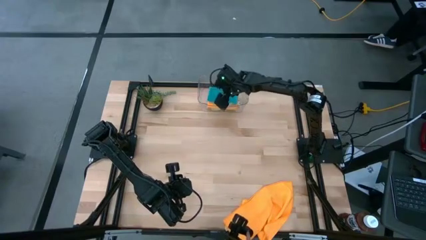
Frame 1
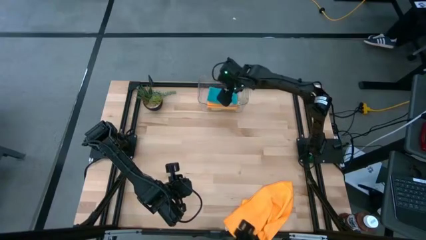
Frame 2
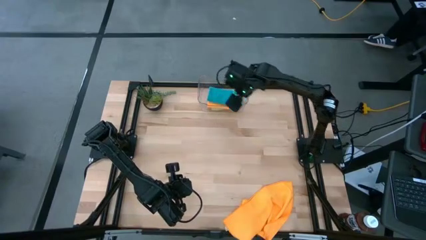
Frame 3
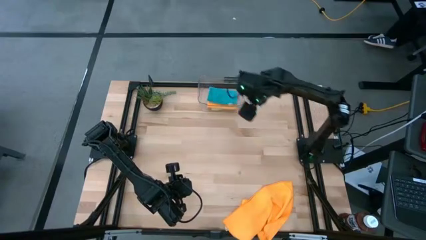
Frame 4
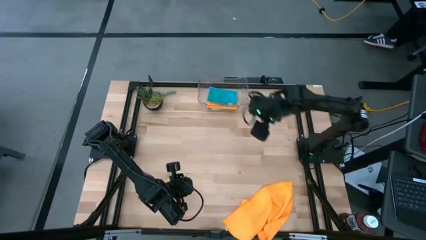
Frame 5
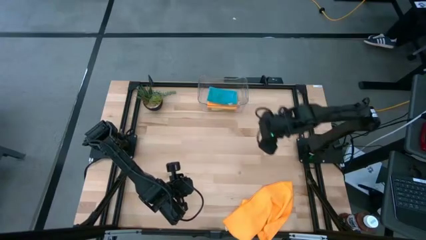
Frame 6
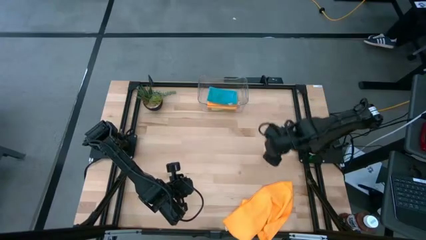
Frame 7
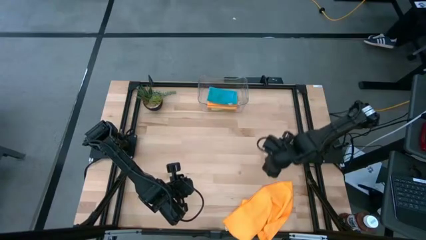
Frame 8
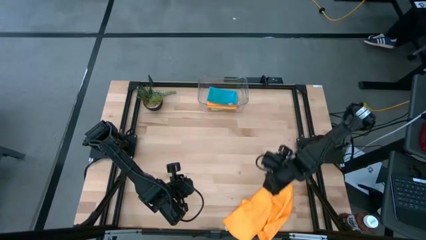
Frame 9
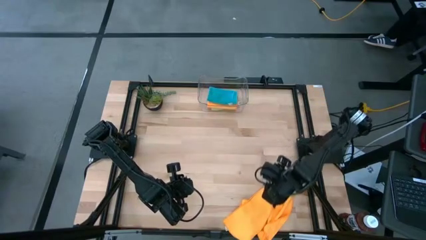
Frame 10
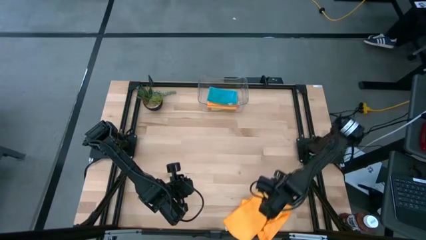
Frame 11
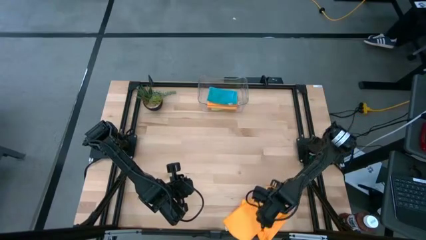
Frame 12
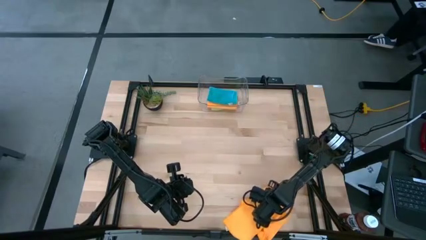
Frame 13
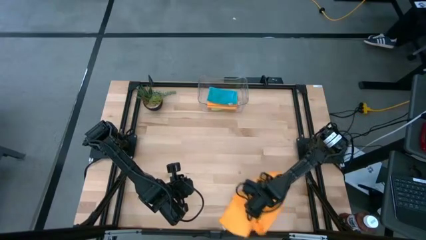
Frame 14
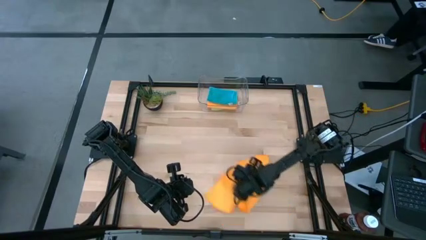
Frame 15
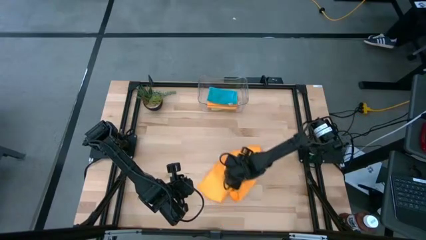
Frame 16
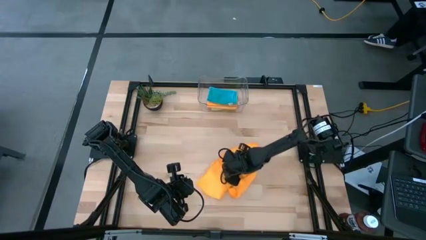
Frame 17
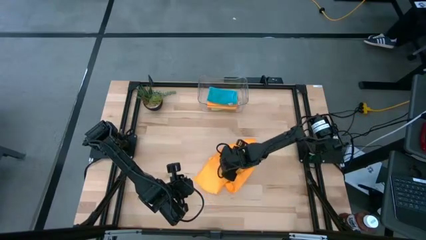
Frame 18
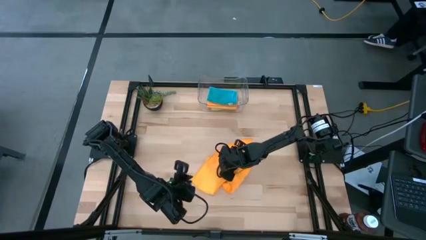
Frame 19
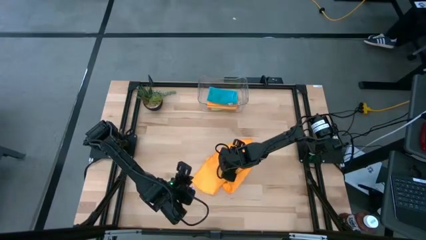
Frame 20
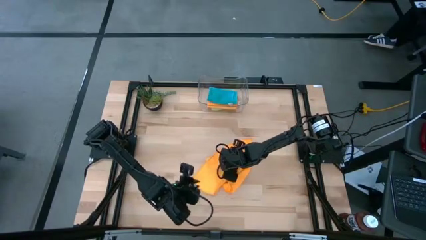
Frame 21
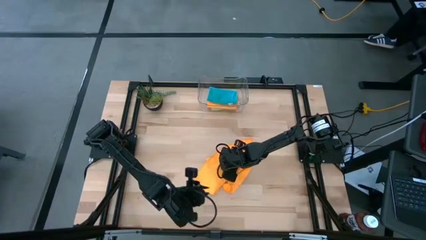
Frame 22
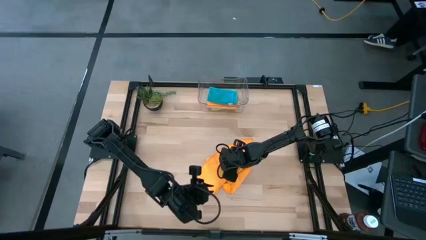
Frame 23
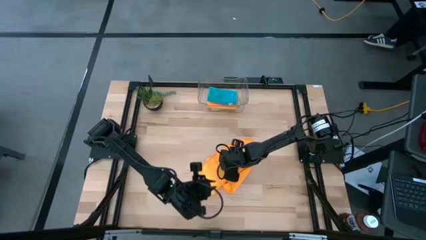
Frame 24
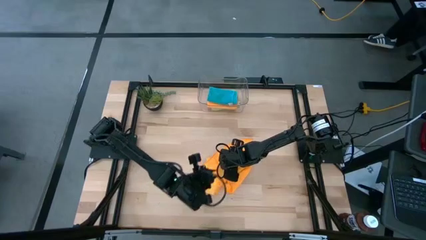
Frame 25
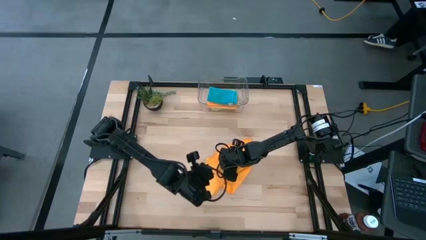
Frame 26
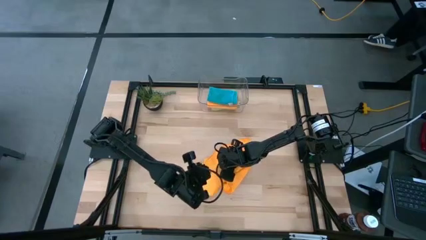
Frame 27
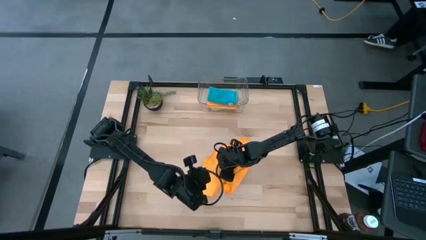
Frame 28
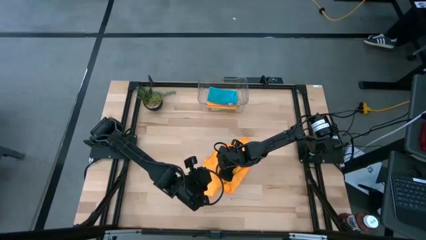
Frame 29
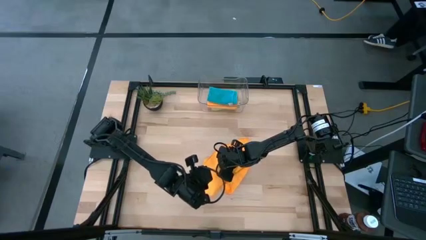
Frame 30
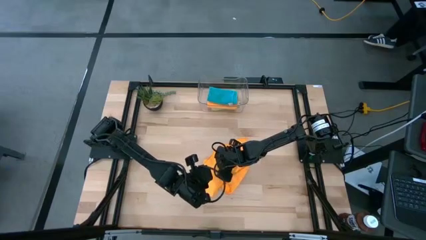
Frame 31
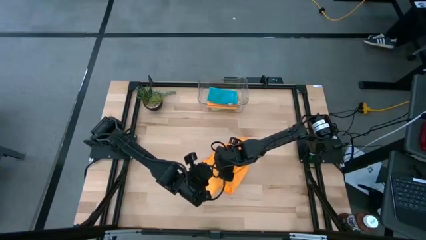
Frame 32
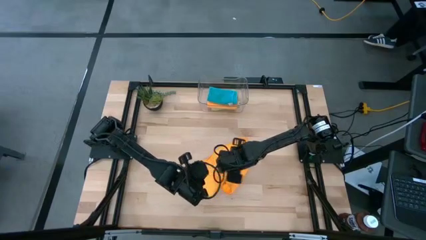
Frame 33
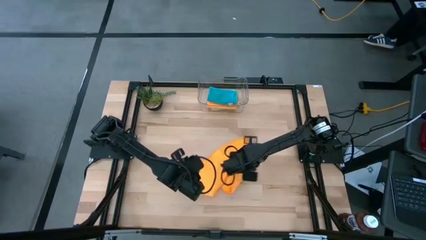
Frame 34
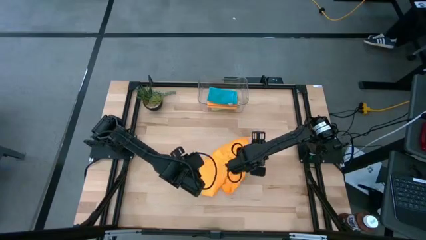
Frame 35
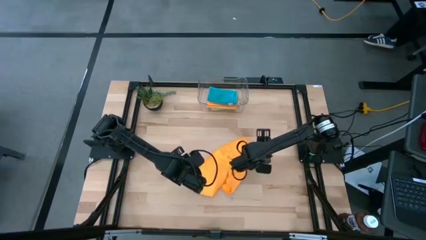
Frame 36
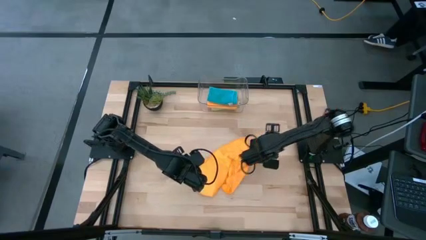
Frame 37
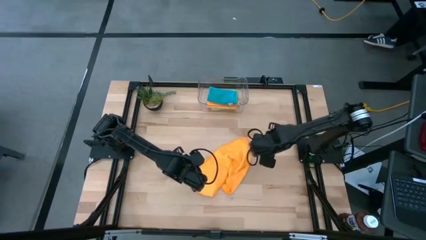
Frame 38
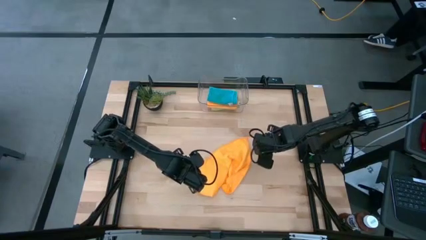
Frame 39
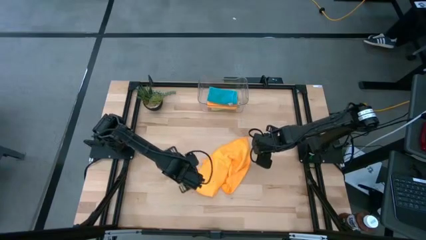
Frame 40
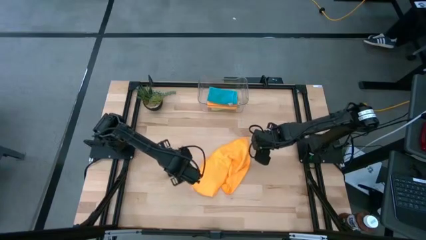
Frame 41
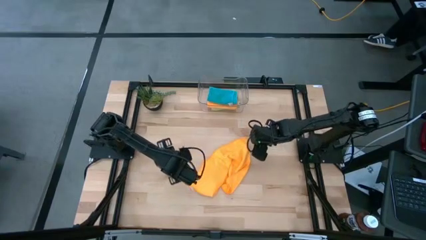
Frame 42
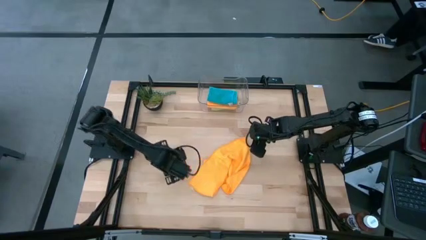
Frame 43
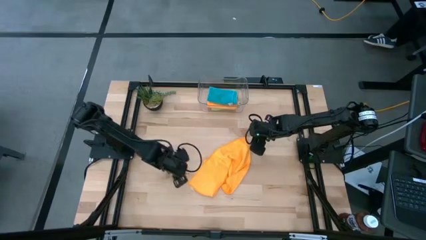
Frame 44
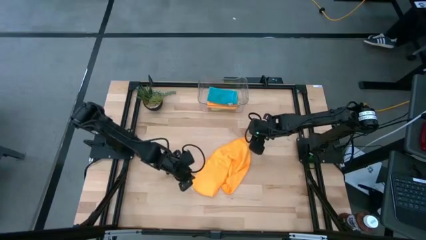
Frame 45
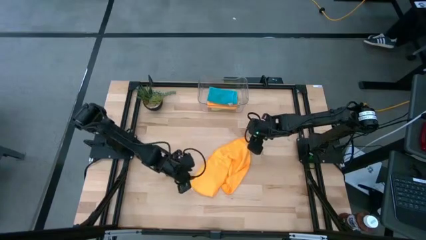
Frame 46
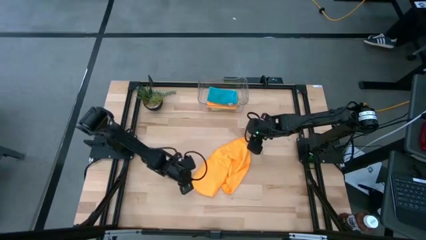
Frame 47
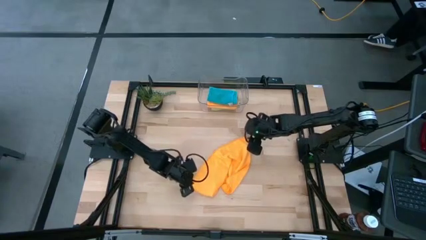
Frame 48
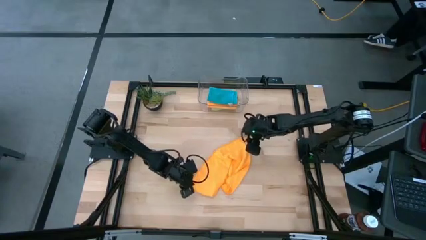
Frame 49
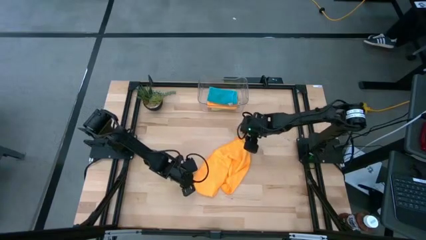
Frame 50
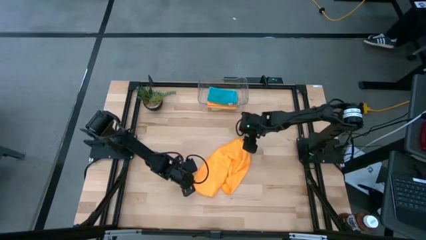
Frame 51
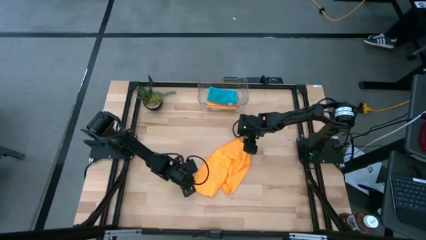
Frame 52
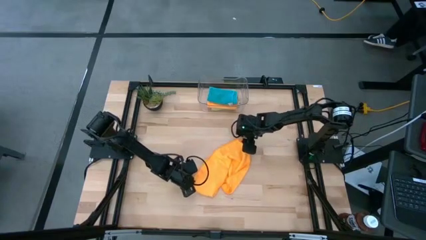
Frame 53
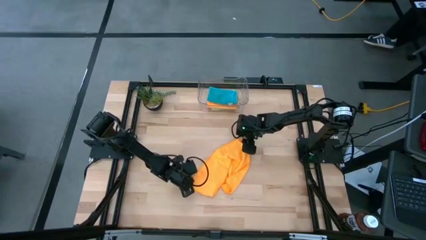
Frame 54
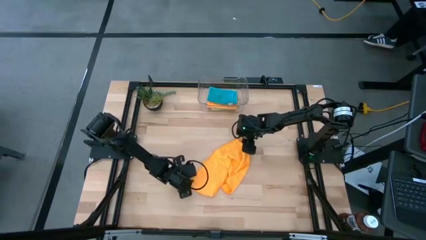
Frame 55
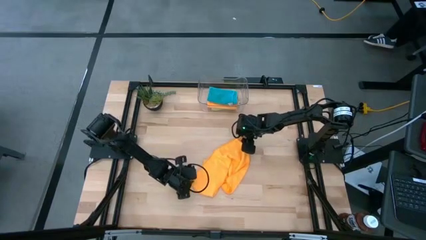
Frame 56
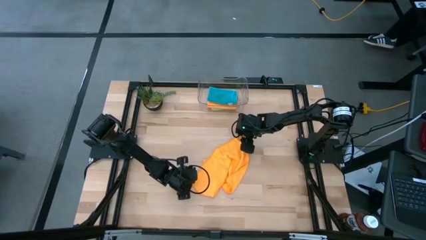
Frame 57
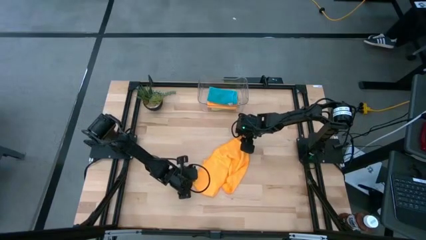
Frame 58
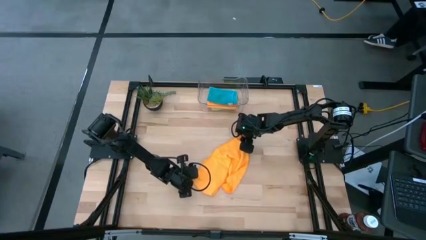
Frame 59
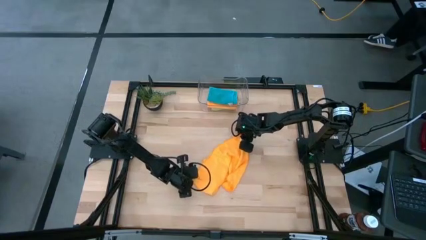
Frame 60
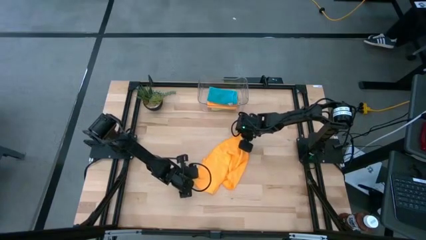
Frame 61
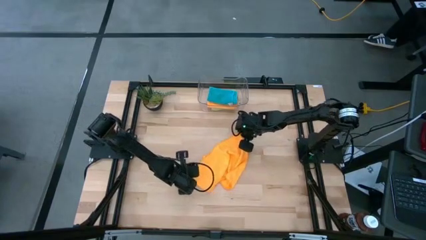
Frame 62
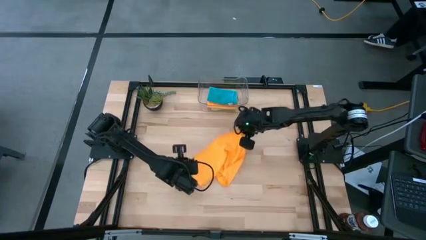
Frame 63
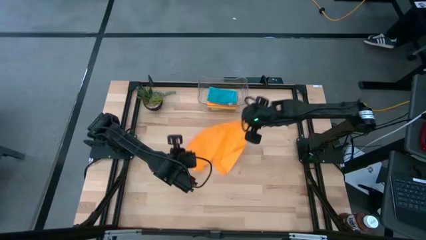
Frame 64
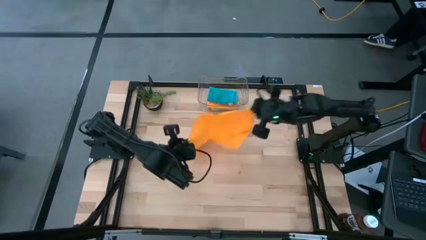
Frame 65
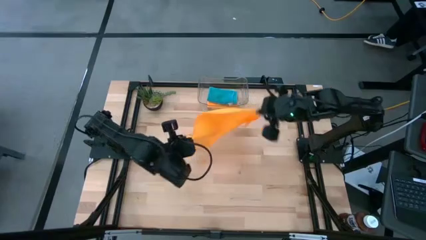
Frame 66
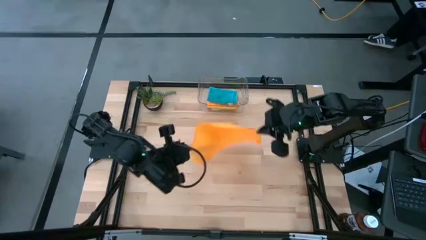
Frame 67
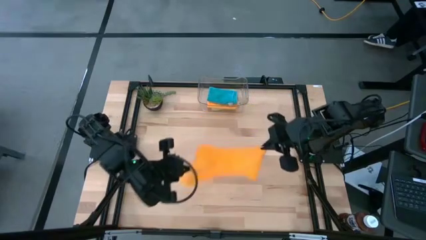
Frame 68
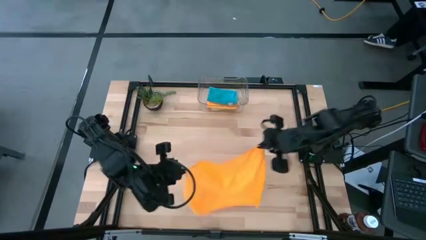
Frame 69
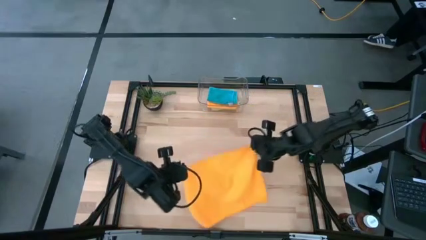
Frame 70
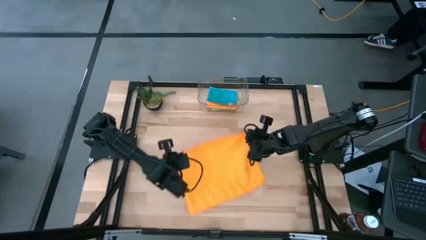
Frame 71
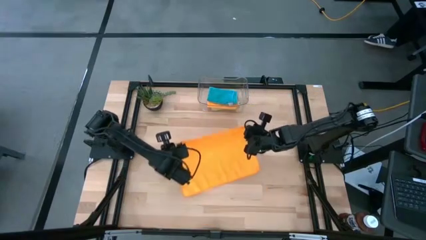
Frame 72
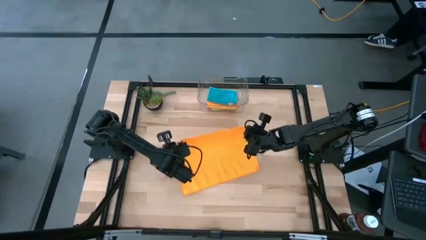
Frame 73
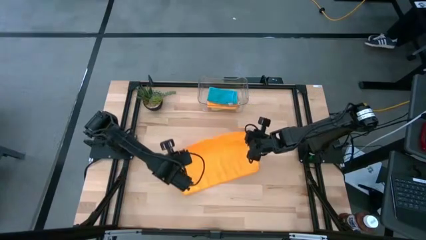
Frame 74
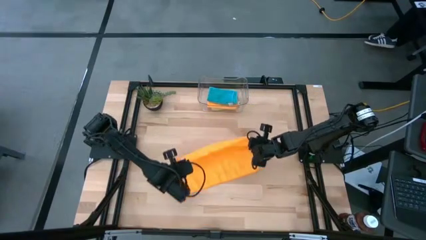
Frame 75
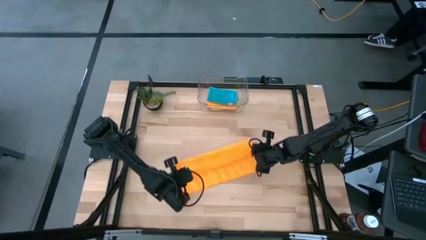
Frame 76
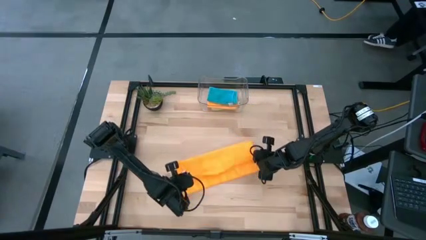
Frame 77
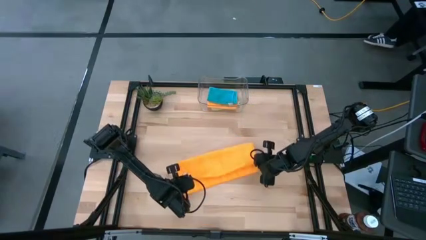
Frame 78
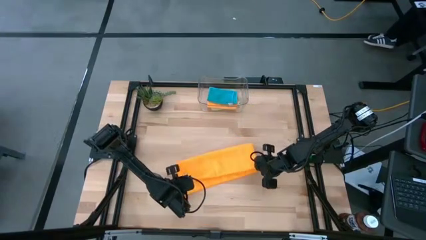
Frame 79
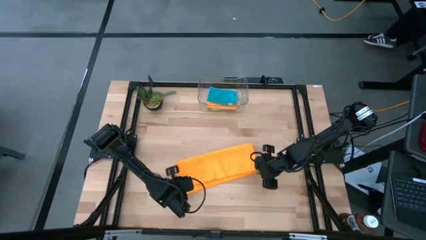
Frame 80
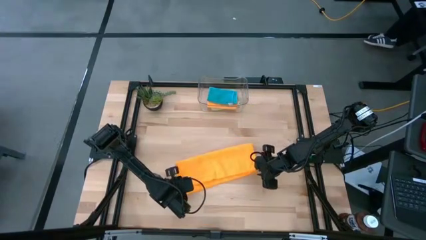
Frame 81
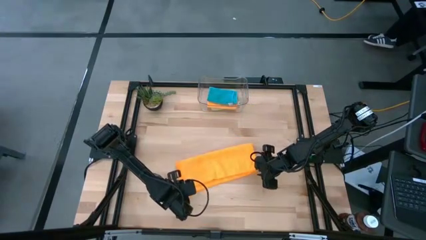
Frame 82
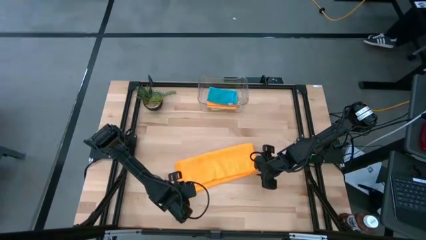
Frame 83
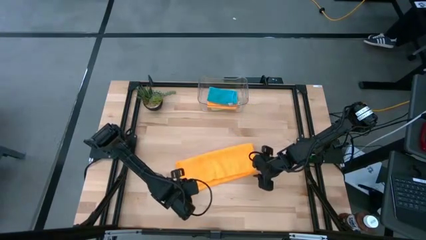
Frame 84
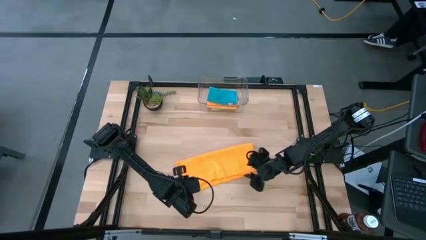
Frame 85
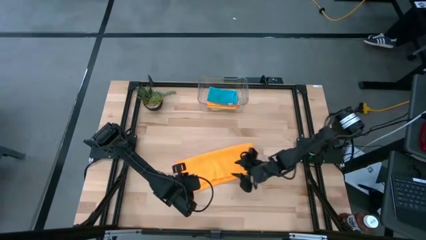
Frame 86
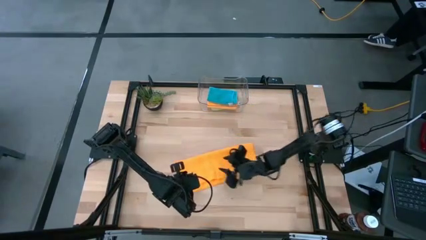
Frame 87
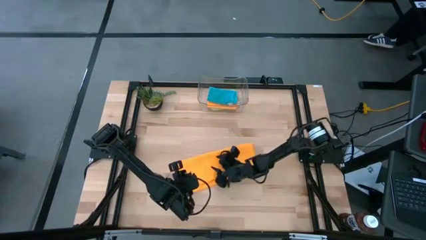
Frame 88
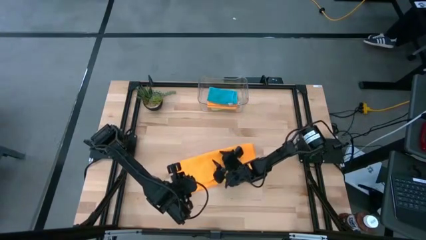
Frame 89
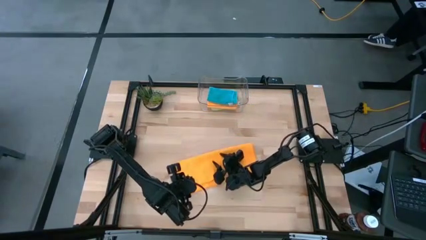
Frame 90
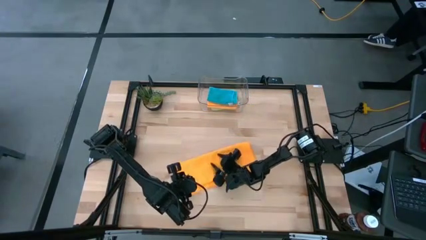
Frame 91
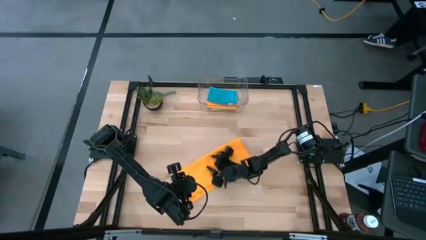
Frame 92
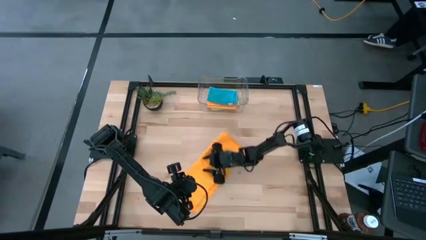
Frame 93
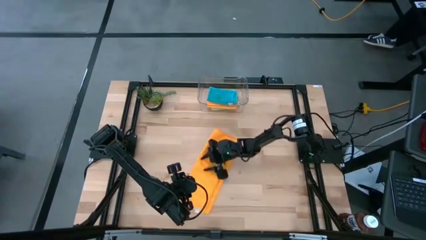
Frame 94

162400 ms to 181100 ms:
Task: Fold microfiber towels
Fold the orange microfiber cloth
